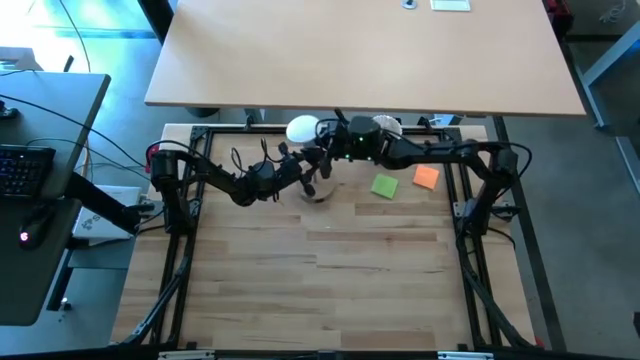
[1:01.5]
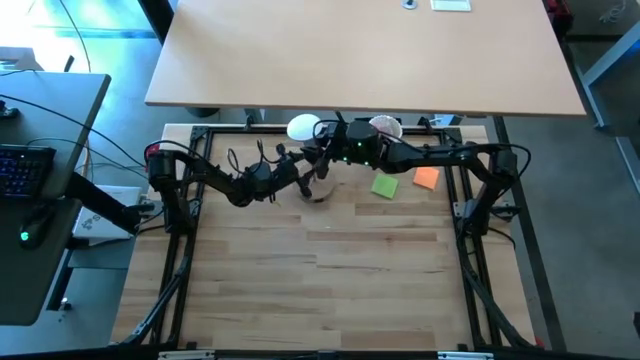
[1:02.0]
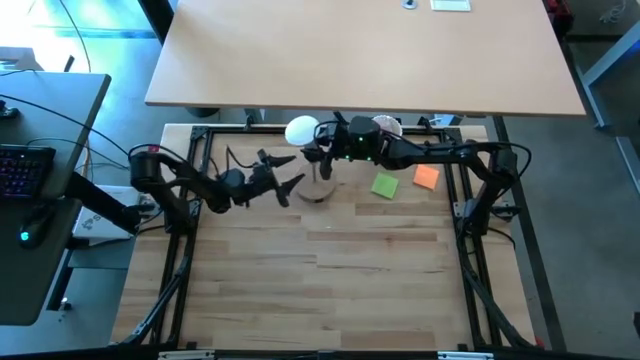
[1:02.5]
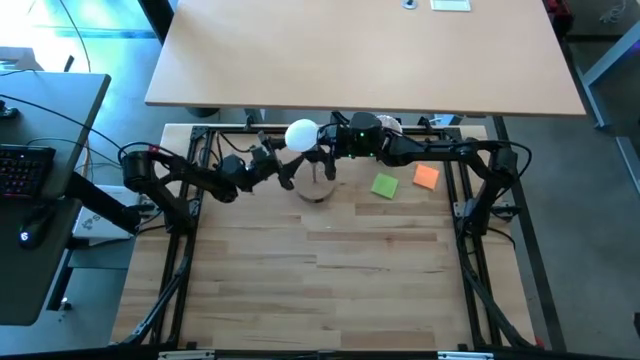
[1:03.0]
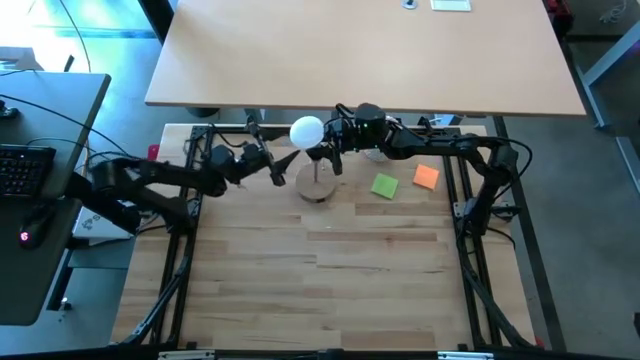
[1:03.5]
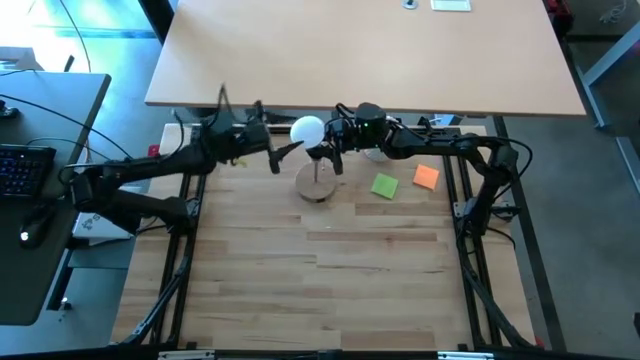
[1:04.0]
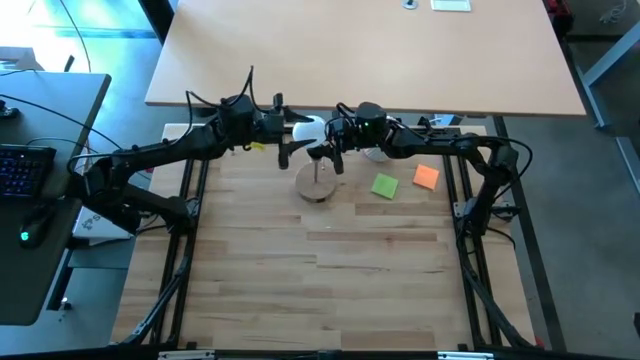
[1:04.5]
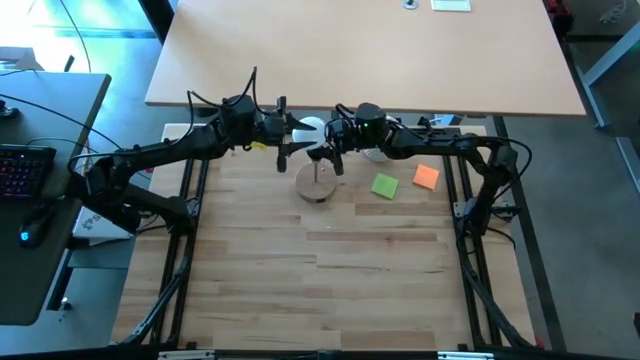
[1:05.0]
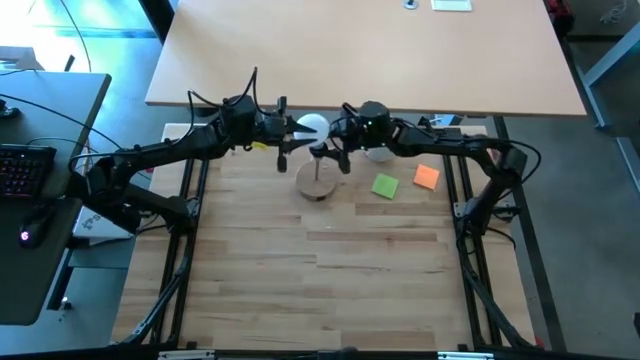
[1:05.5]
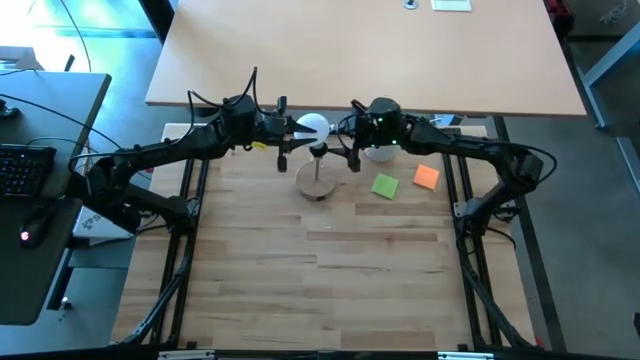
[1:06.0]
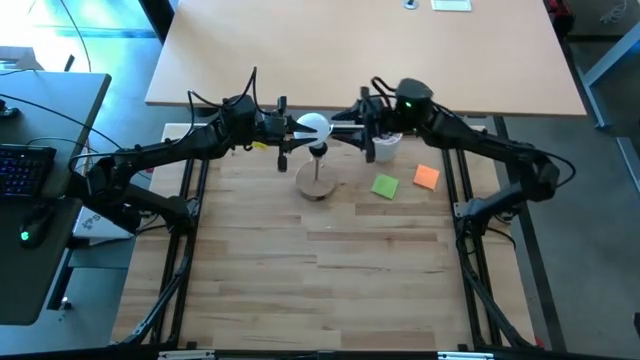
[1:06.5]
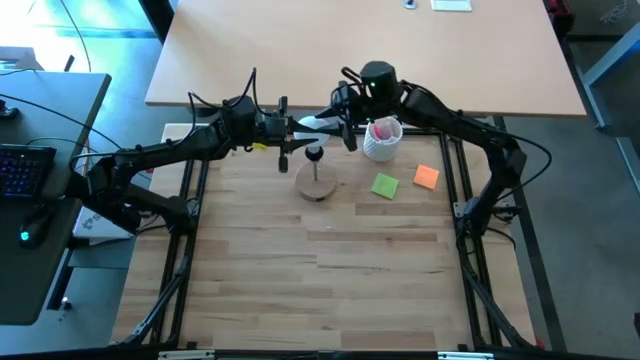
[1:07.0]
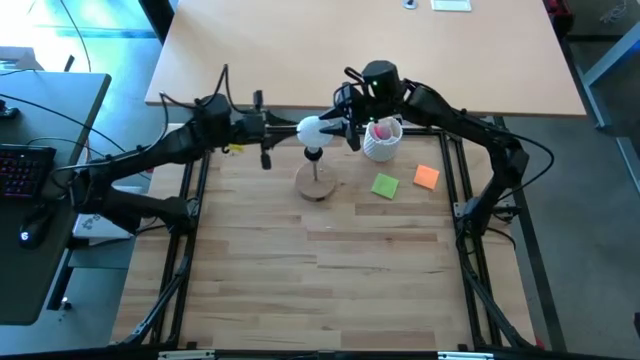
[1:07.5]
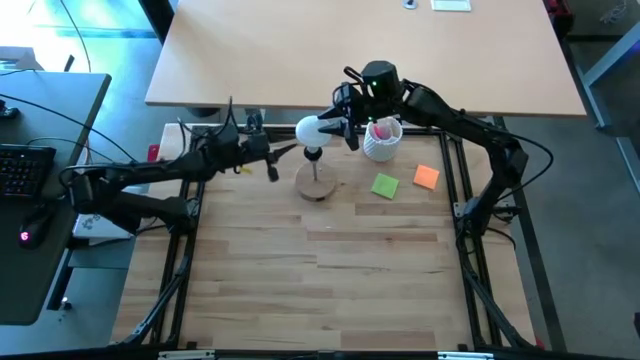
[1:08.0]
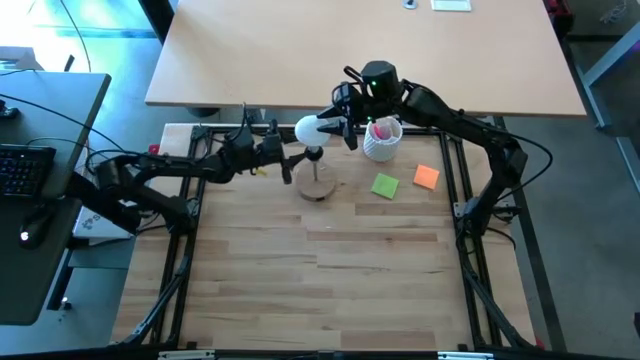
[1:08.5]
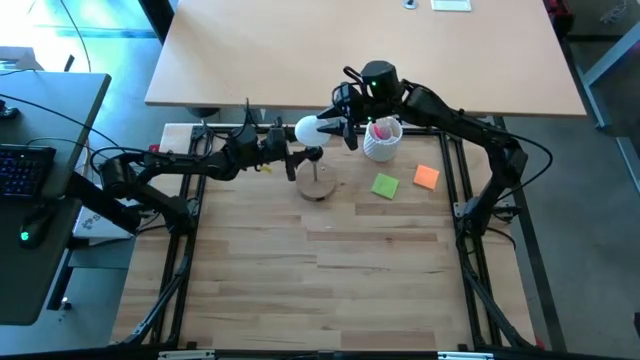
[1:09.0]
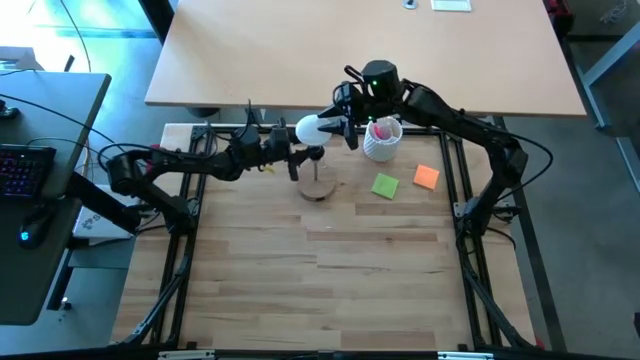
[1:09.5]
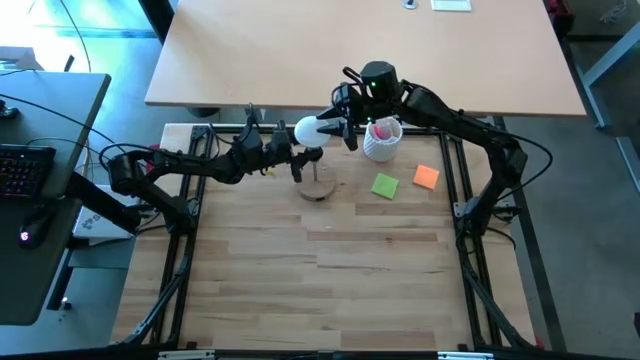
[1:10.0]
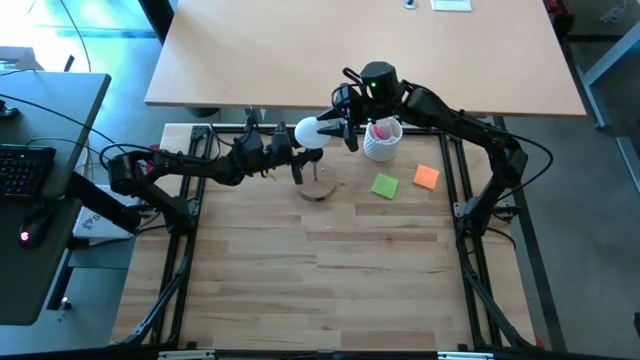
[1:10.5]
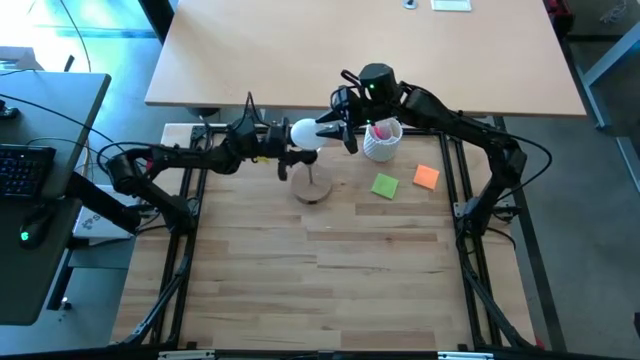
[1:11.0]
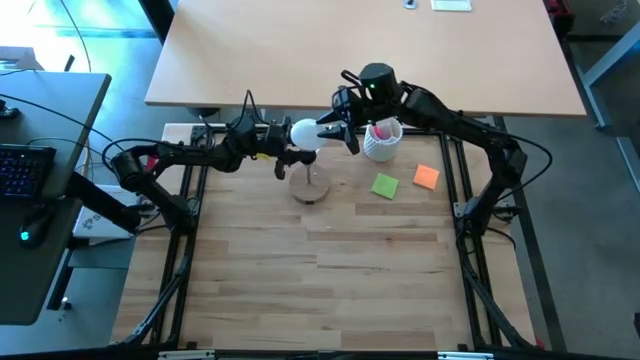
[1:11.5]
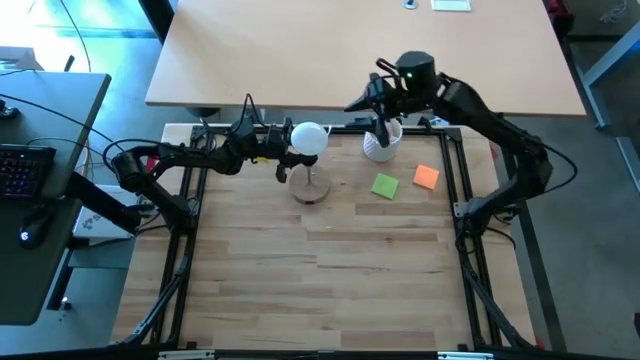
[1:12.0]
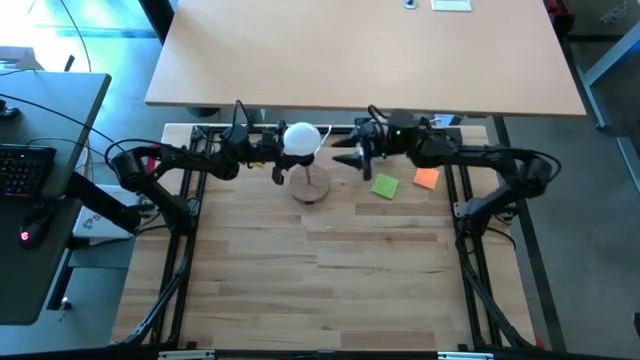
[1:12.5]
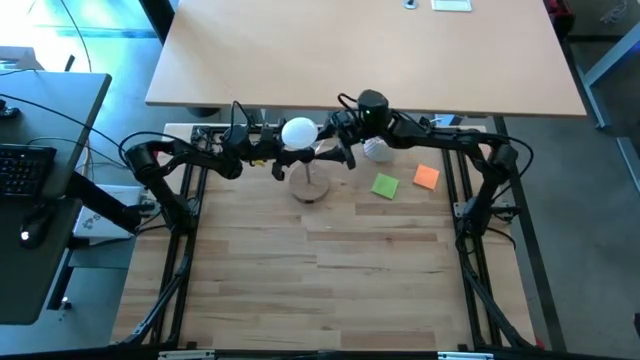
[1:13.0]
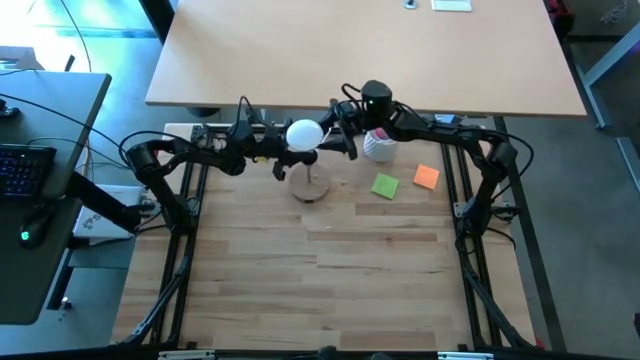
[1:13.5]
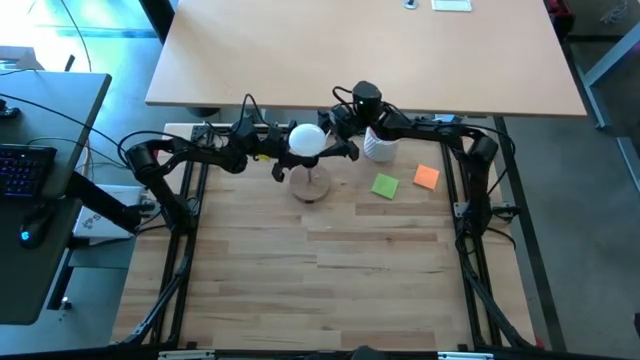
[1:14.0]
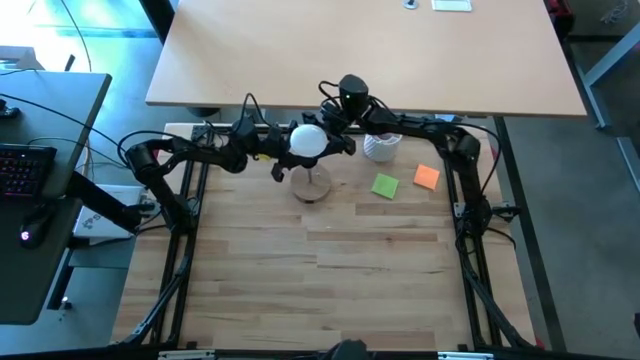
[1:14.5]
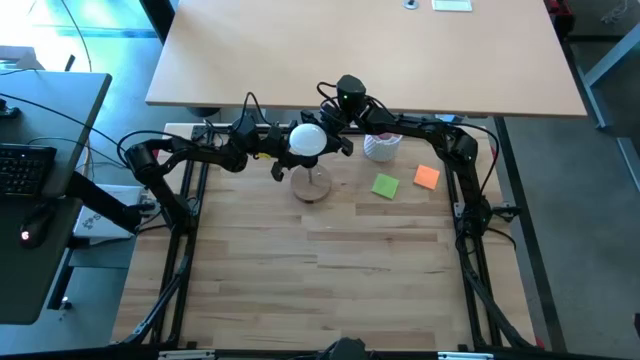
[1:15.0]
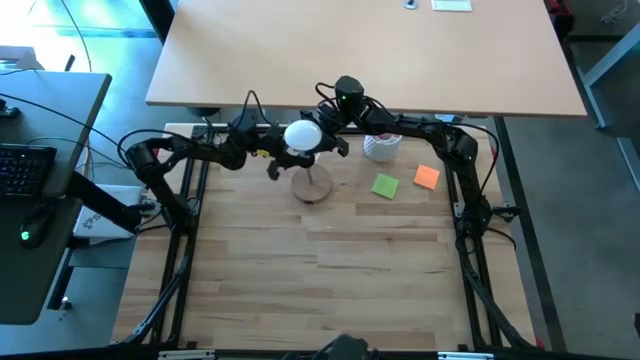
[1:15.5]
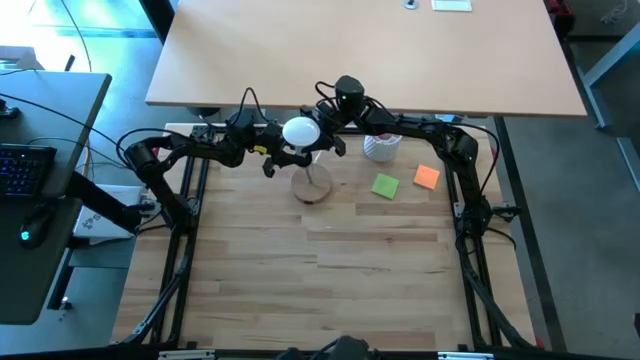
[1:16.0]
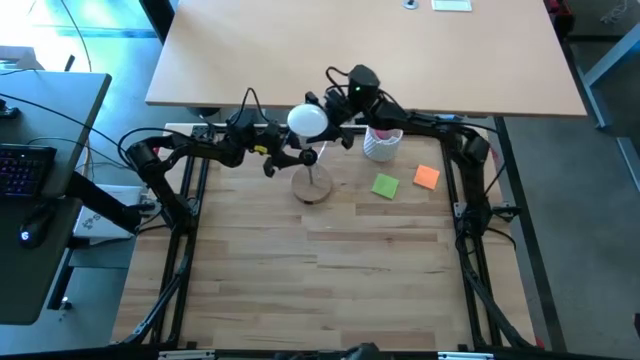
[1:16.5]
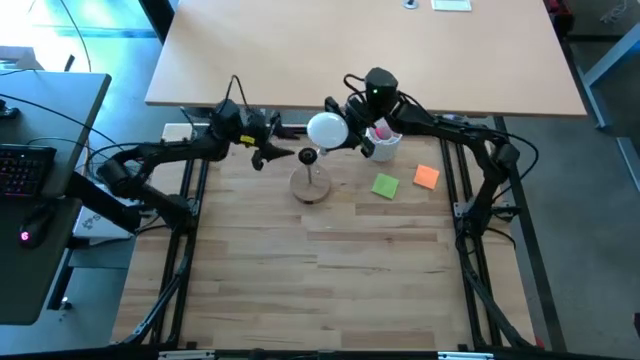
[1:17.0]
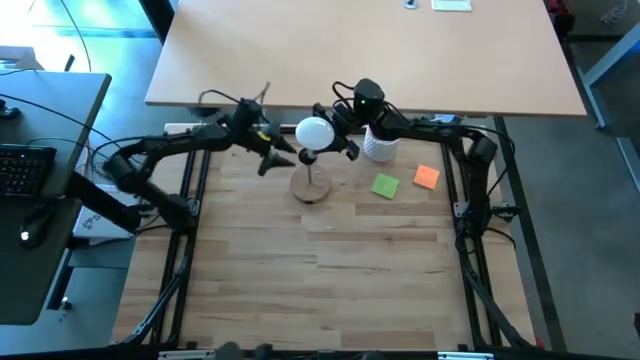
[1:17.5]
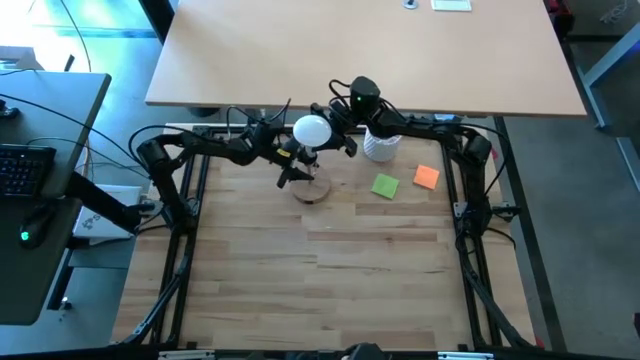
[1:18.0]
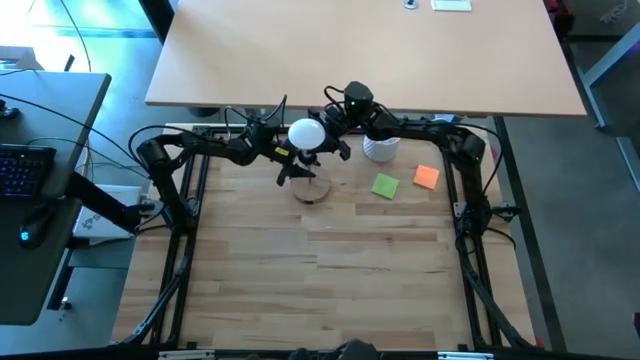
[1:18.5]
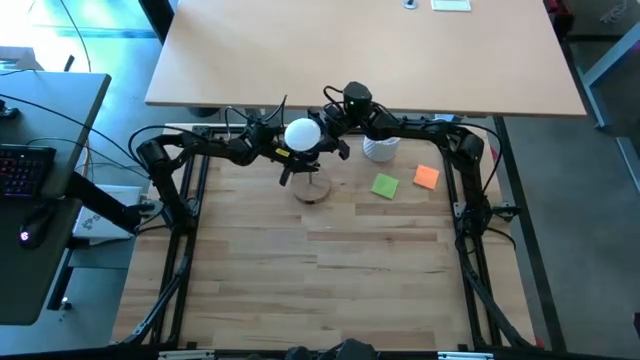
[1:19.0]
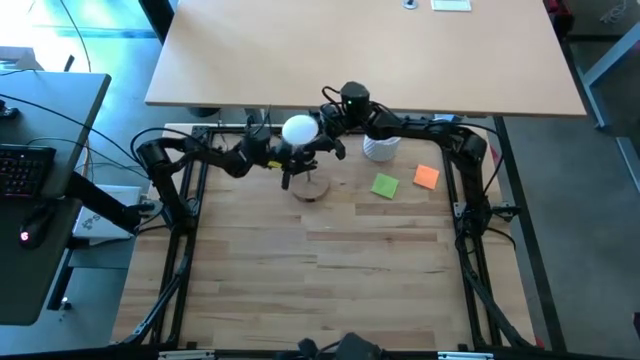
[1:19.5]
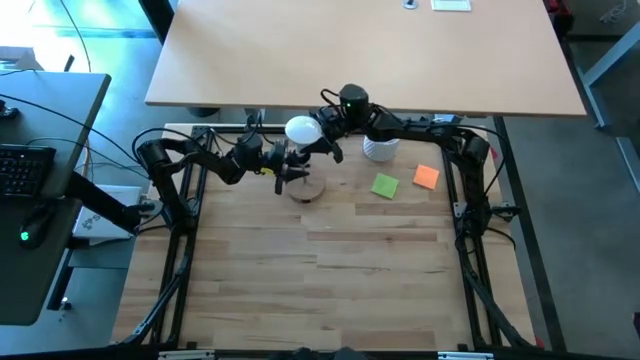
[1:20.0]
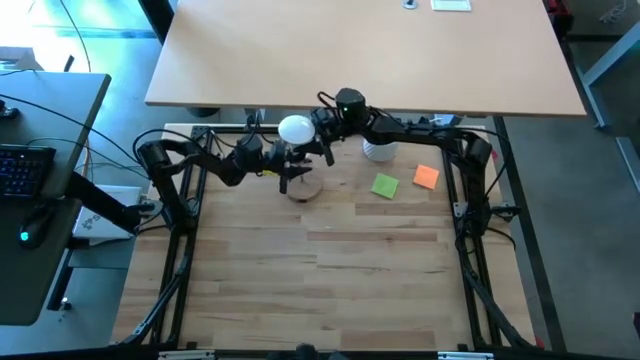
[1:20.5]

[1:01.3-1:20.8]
Task: Screw lightbulb
Insert the lightbulb into the lamp socket

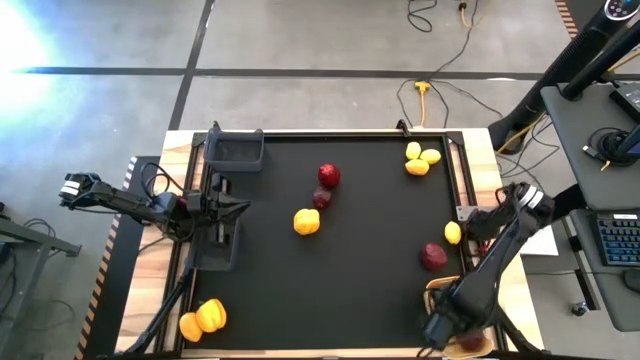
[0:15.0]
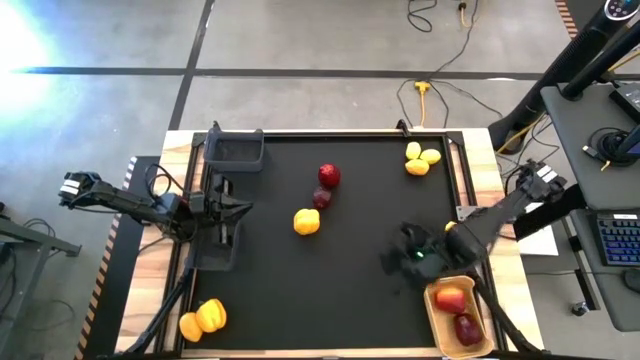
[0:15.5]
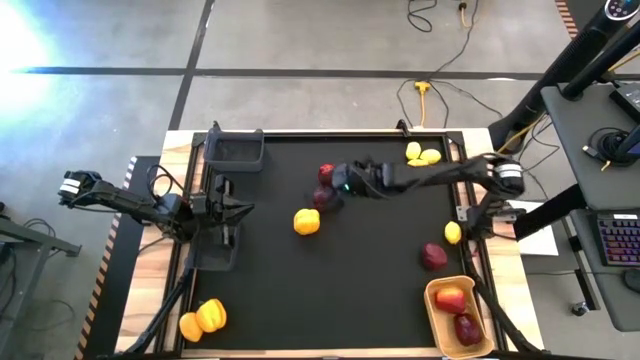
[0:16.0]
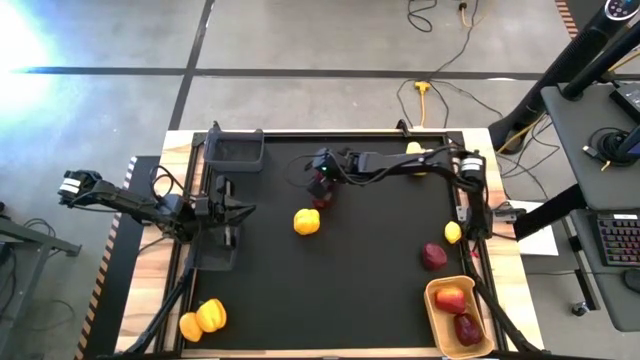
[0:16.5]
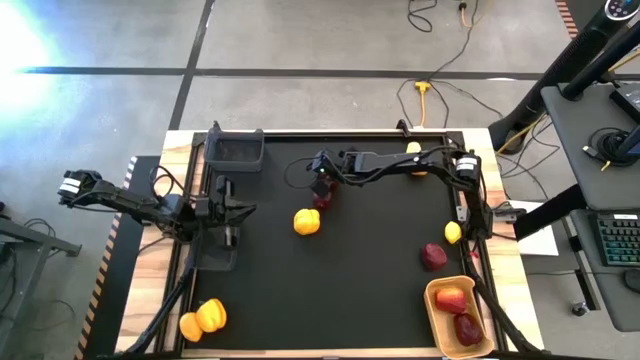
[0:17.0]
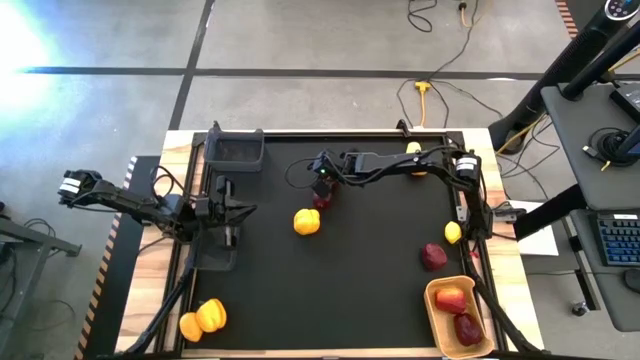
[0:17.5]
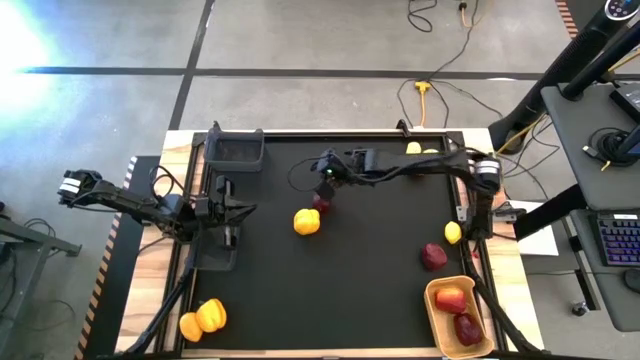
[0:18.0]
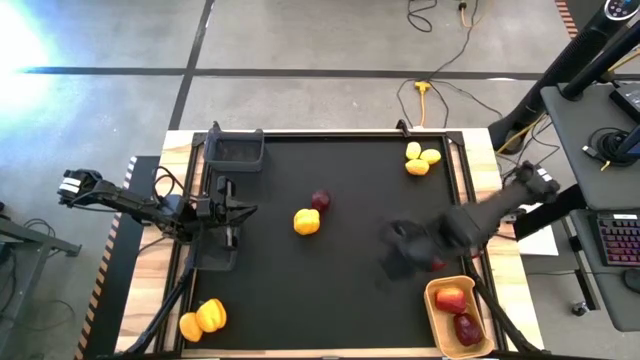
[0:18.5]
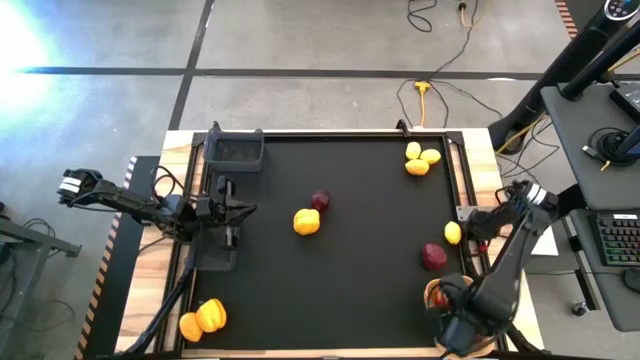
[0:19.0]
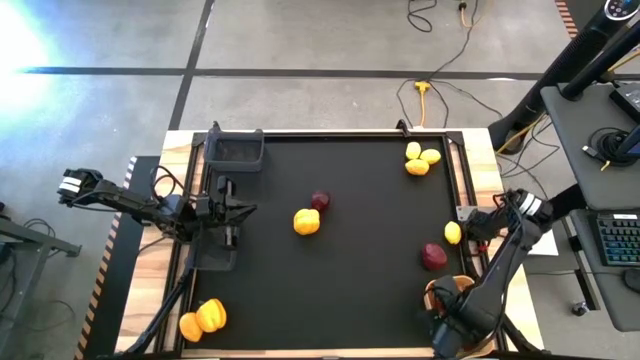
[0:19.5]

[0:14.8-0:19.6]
Task: Sort produce into baskets
Put the apple into the yellow bin
